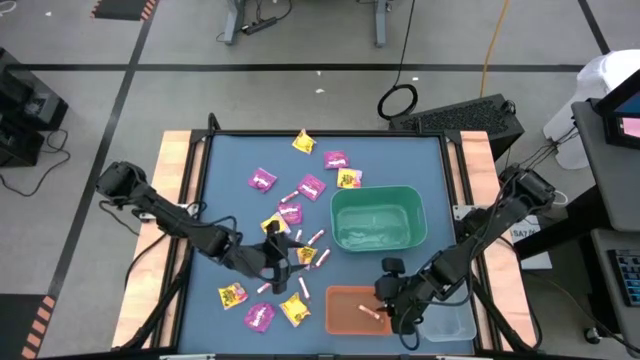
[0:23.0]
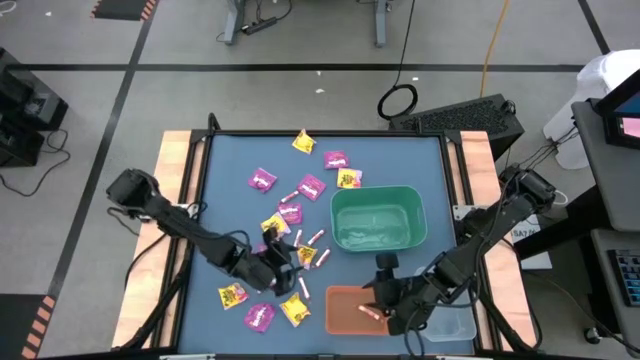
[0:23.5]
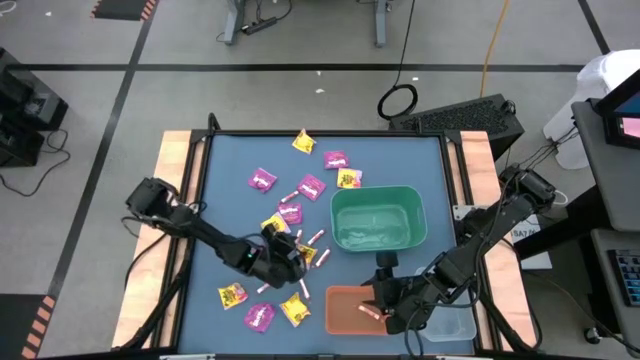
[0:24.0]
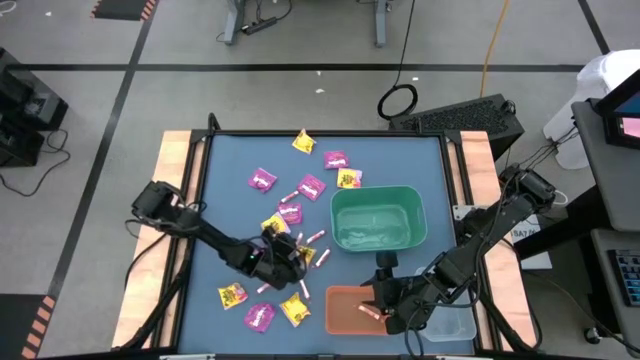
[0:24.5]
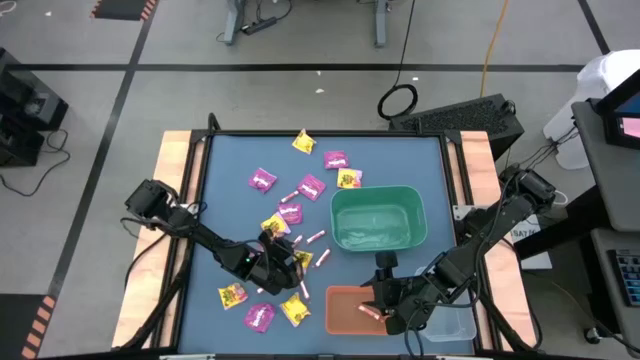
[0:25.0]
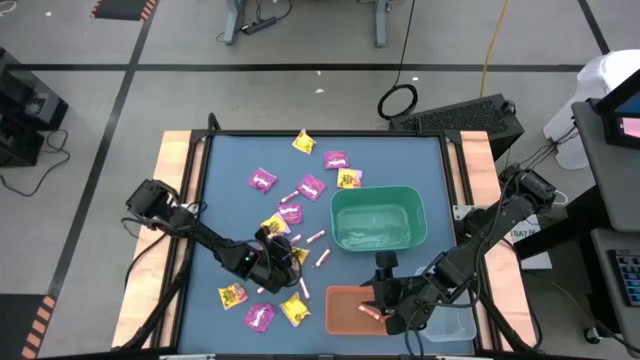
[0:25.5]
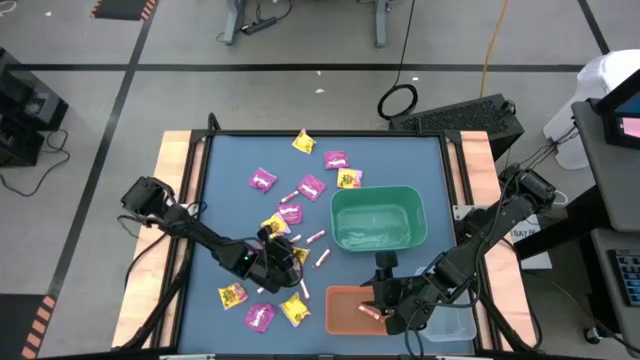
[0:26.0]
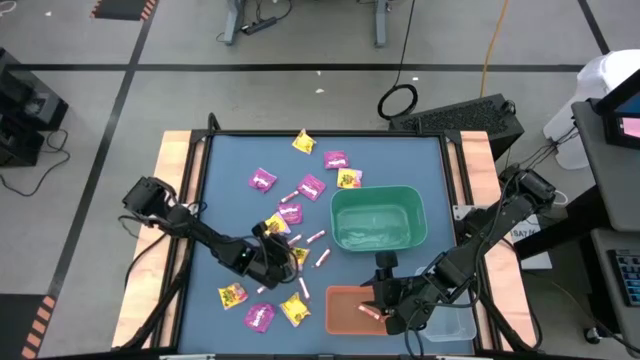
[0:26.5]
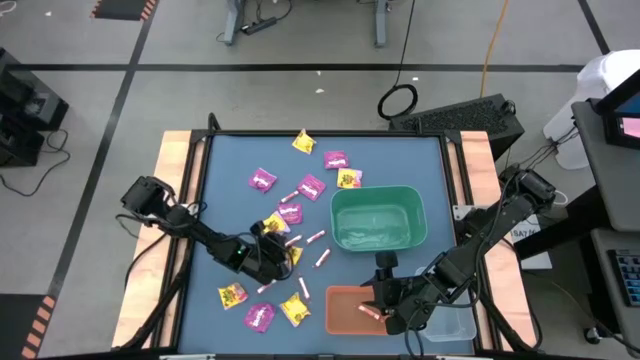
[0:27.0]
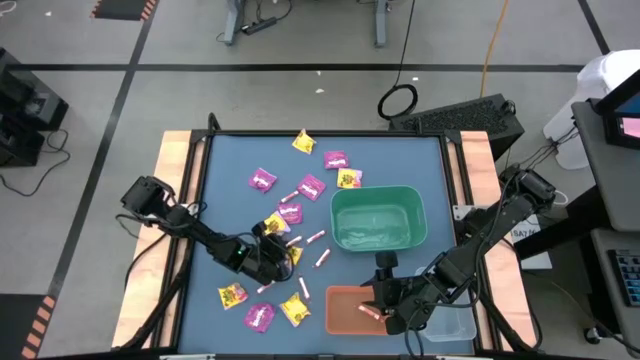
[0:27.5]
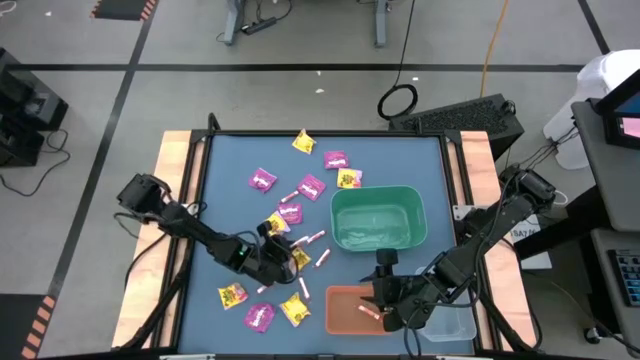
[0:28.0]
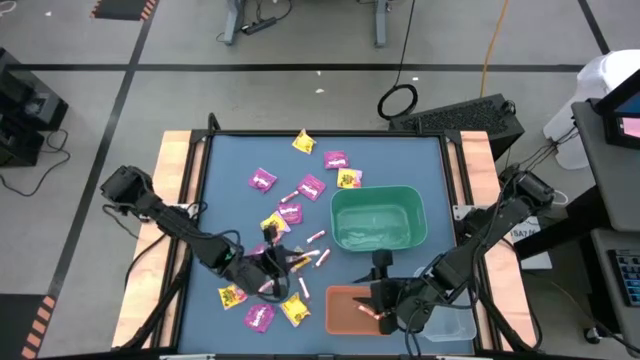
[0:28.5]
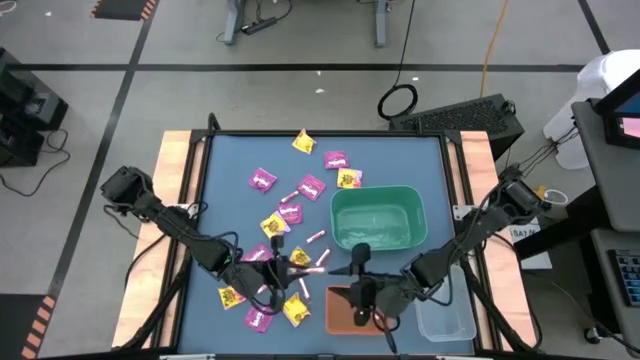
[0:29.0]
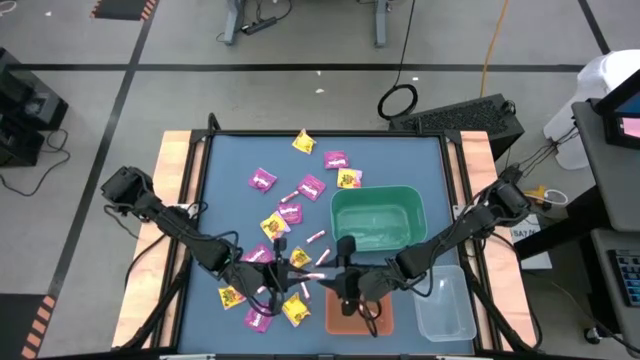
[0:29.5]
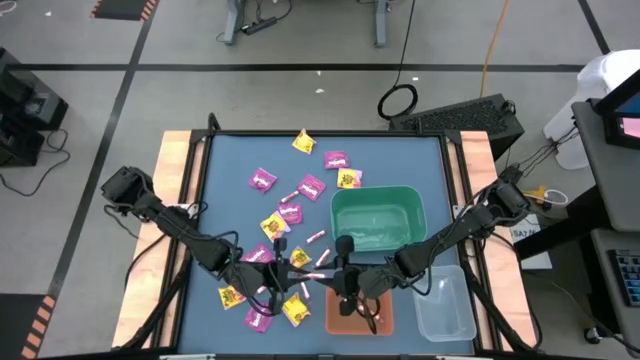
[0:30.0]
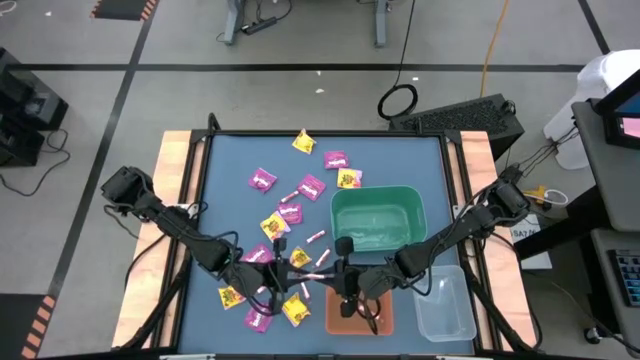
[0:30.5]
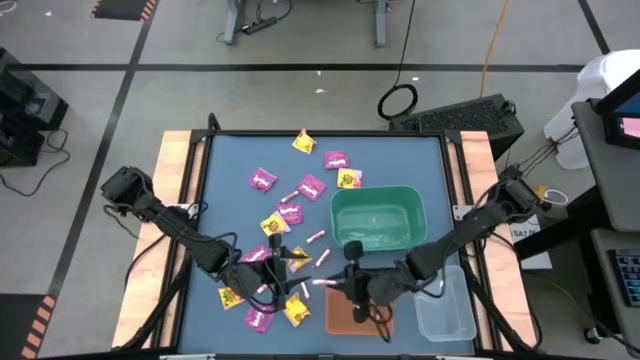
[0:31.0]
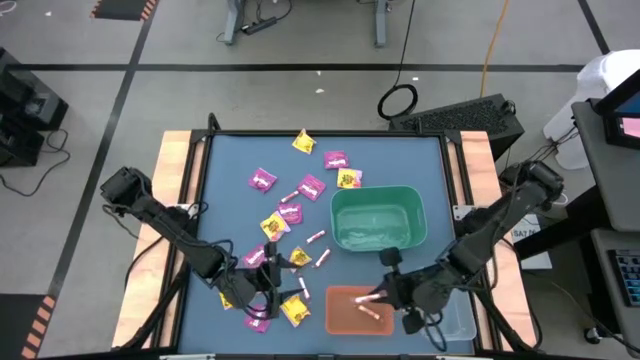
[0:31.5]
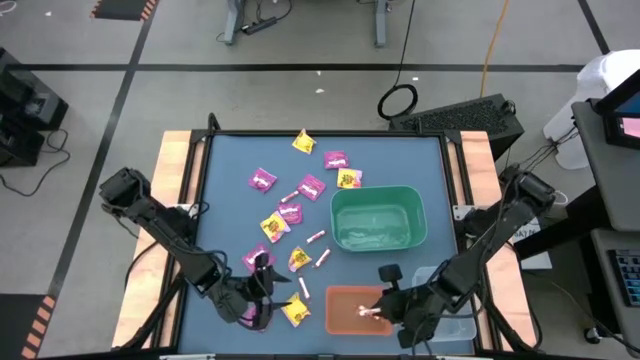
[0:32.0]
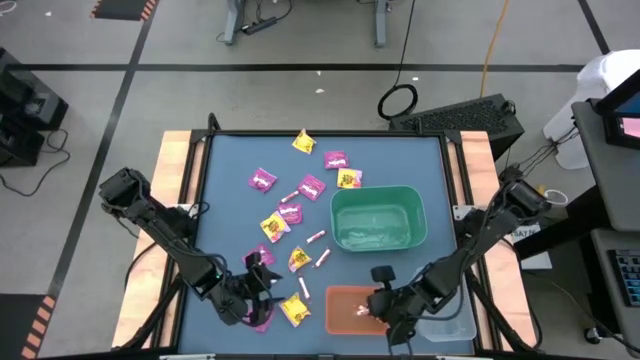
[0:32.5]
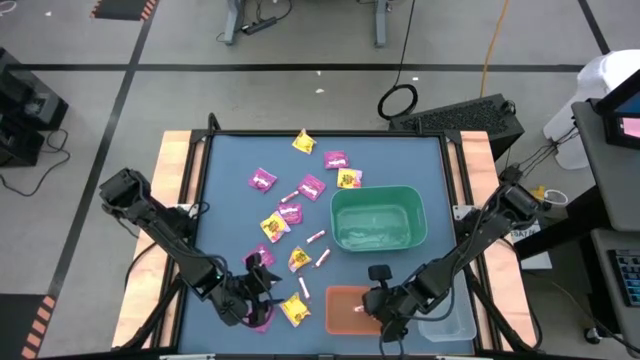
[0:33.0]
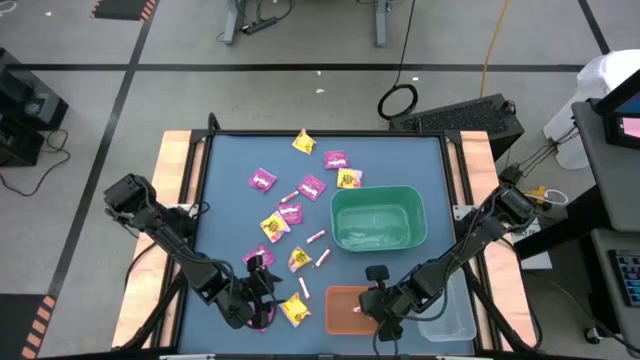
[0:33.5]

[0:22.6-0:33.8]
Task: Sort candy
Put the white candy into the orange bin

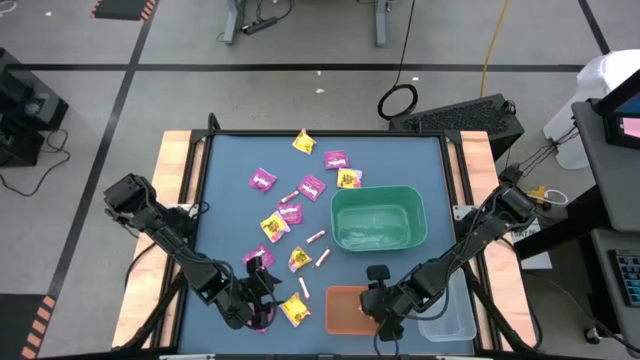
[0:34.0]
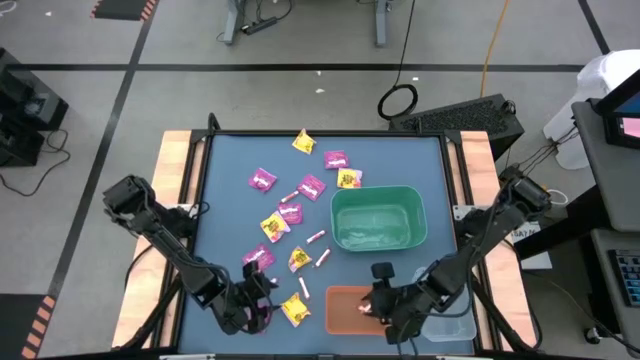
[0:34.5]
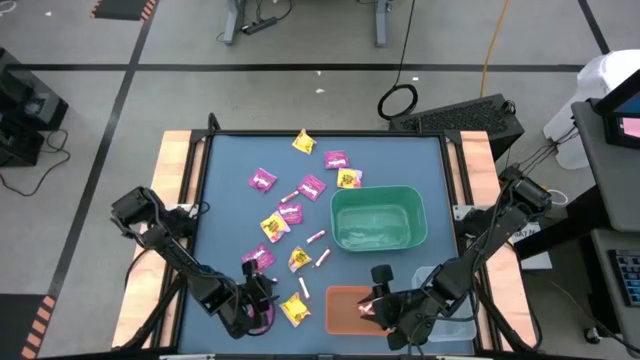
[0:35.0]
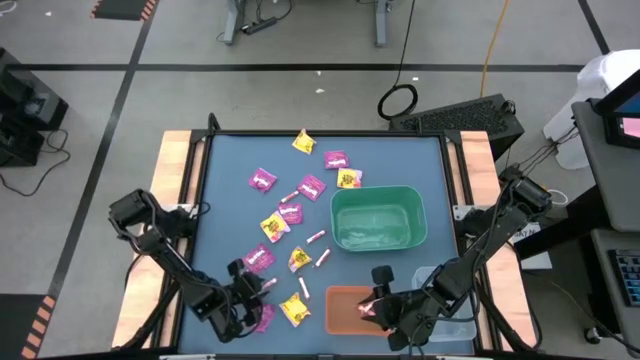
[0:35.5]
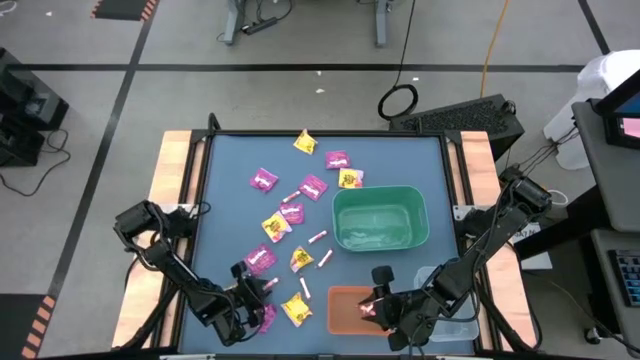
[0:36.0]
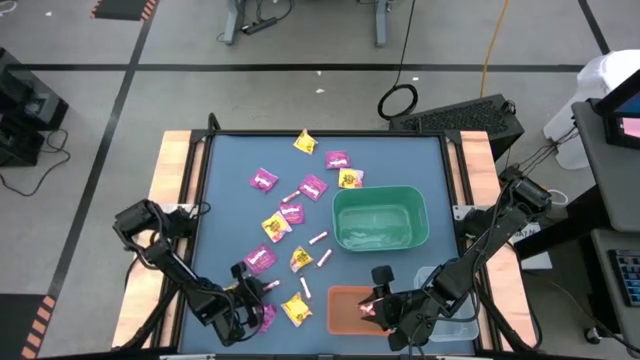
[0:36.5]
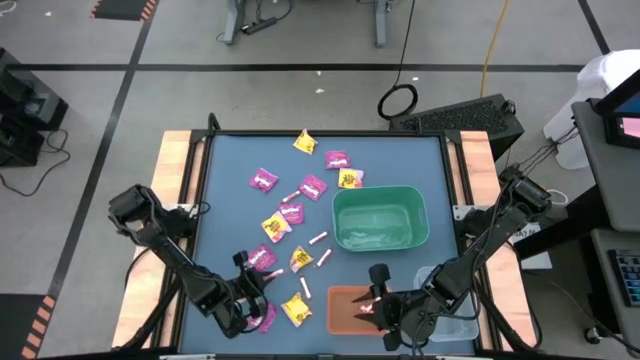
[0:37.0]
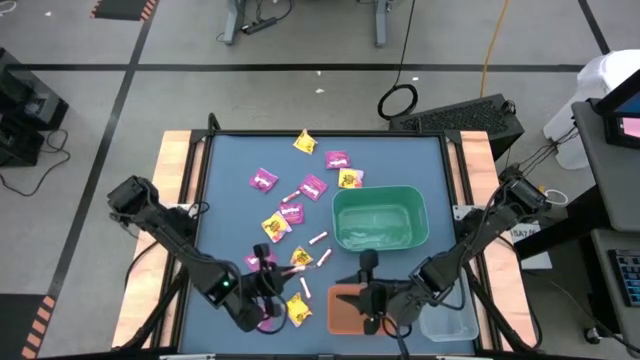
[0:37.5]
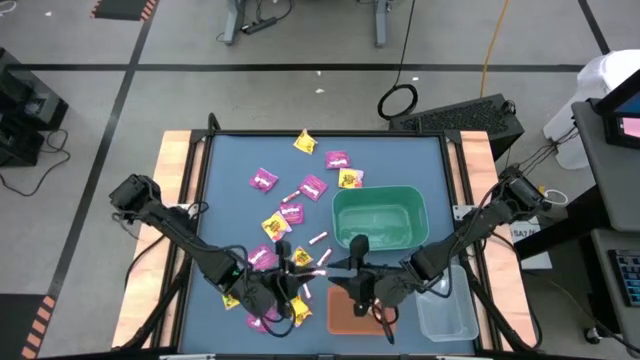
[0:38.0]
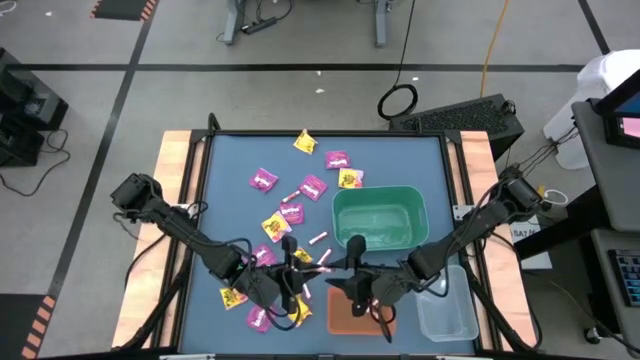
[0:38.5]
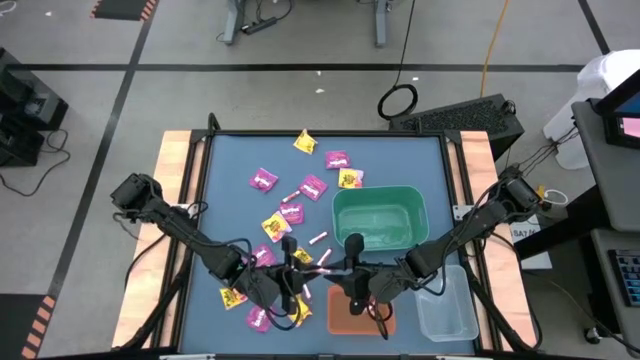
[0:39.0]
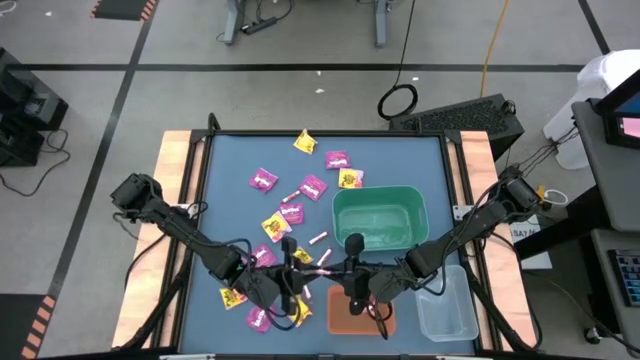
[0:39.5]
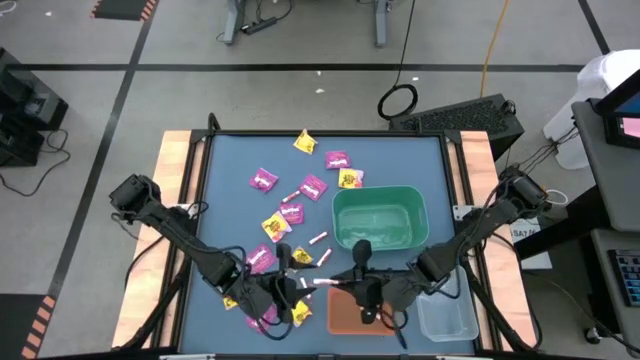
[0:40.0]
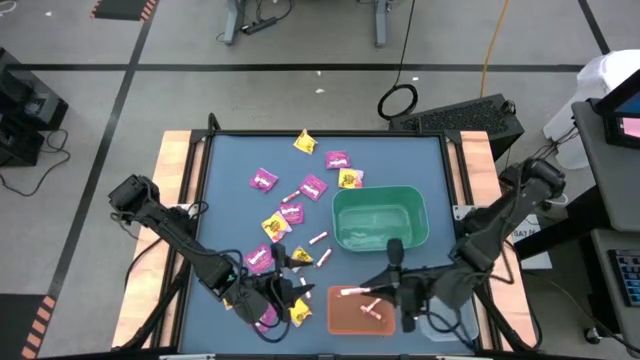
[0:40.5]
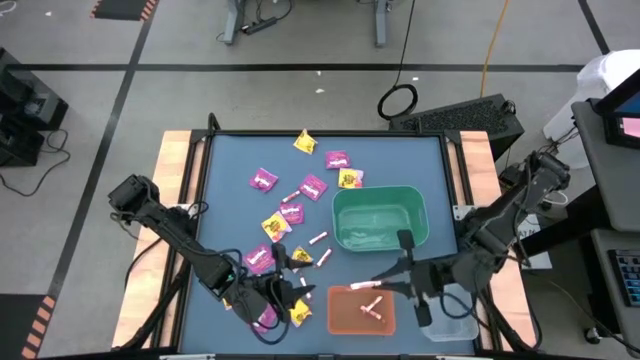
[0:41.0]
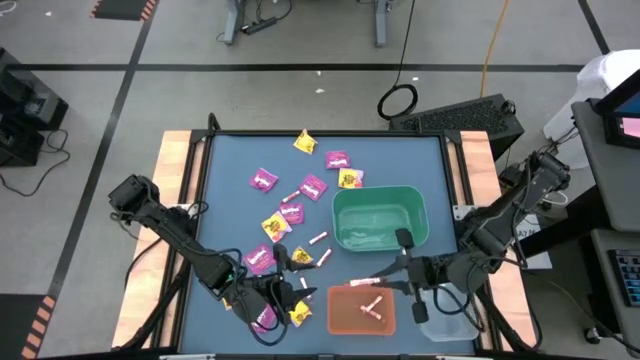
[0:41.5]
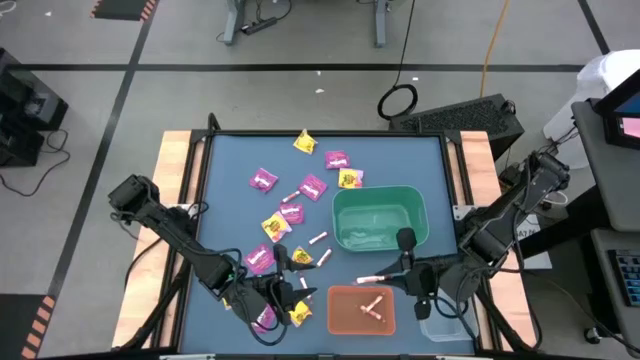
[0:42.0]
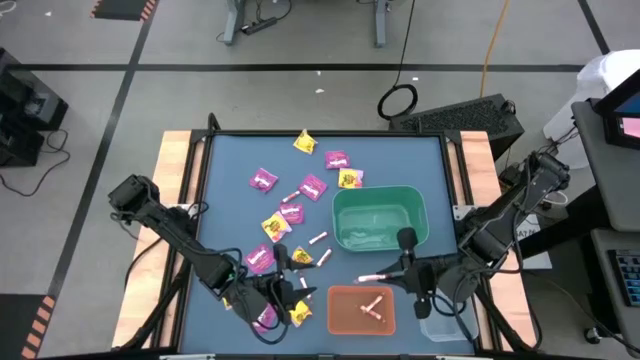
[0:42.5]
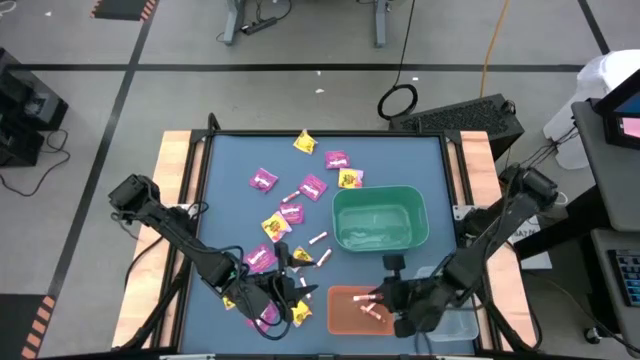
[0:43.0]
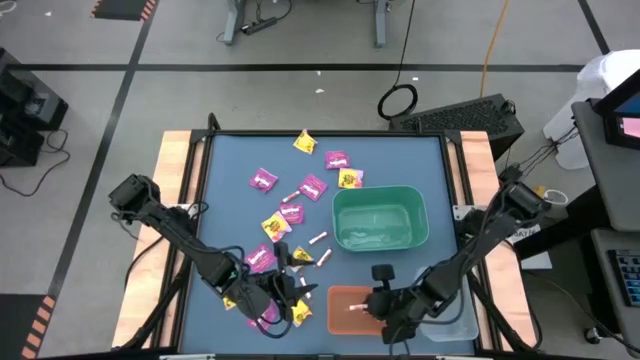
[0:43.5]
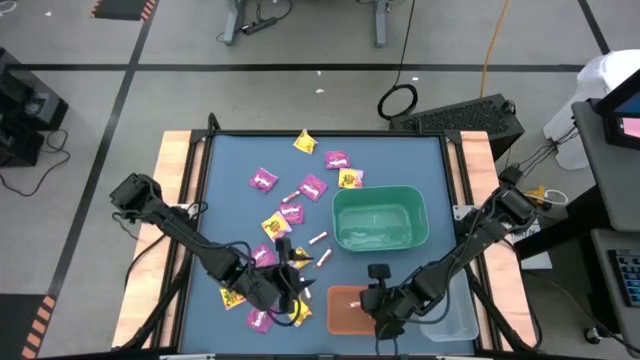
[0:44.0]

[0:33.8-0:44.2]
Put the white candy into the orange bin
